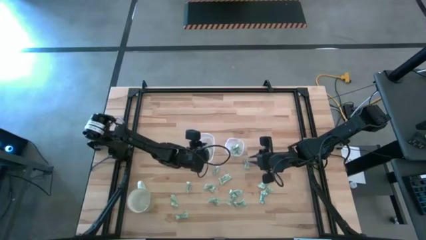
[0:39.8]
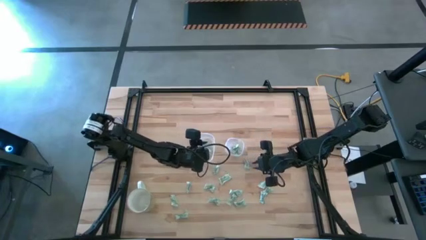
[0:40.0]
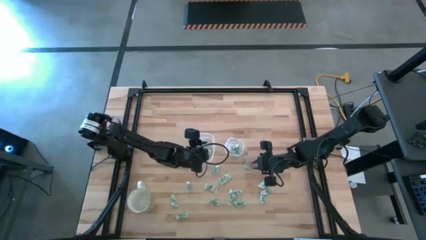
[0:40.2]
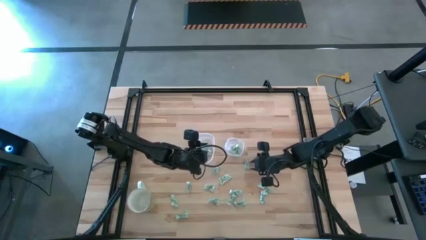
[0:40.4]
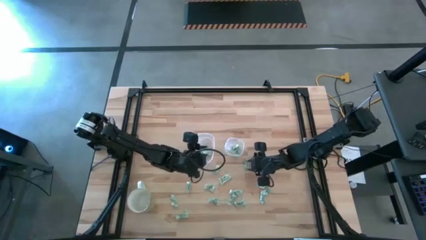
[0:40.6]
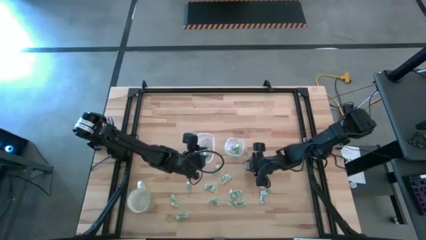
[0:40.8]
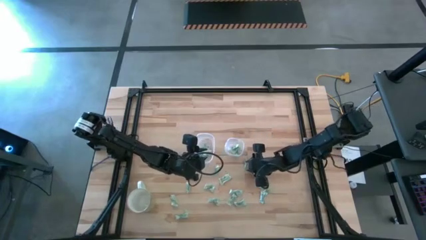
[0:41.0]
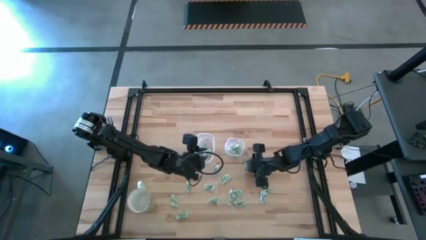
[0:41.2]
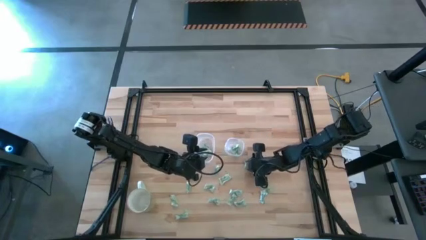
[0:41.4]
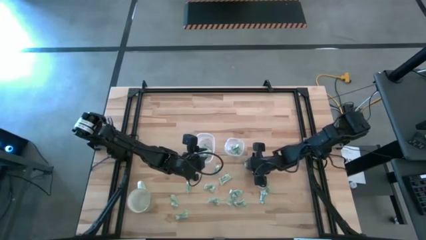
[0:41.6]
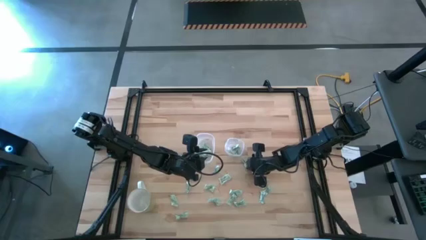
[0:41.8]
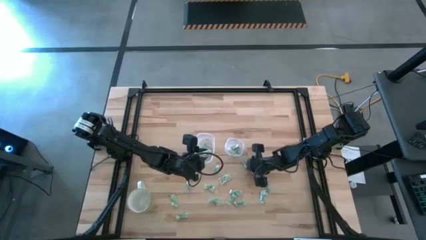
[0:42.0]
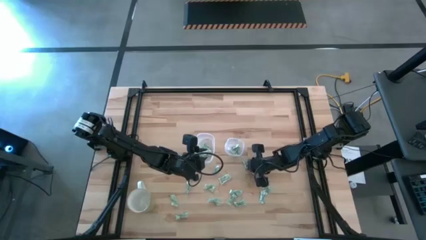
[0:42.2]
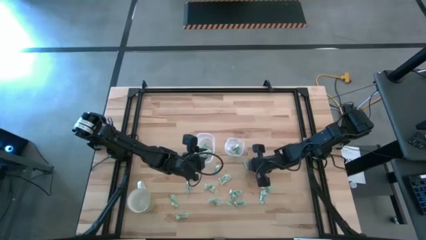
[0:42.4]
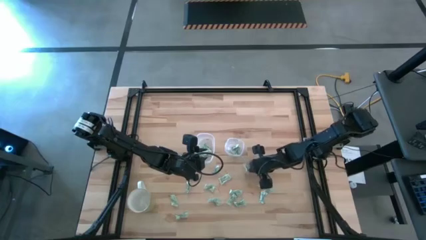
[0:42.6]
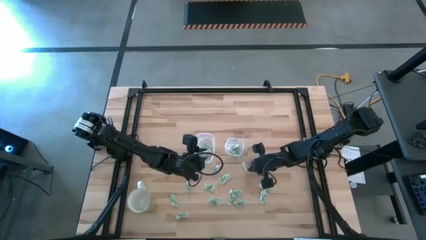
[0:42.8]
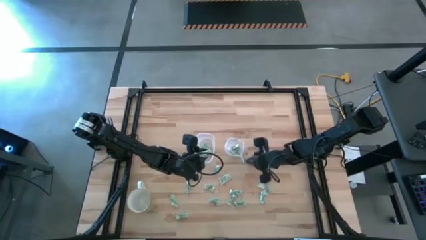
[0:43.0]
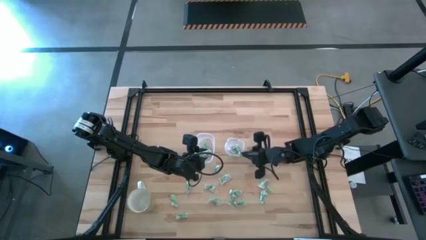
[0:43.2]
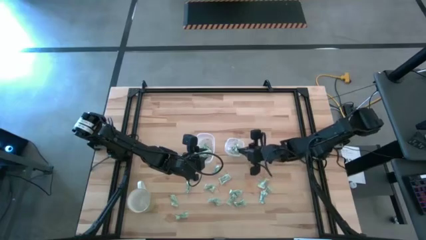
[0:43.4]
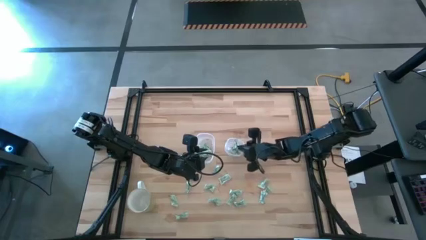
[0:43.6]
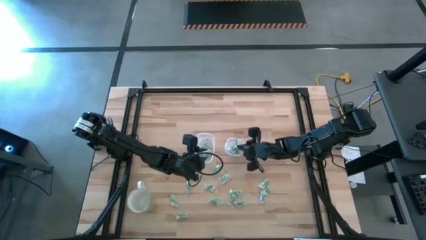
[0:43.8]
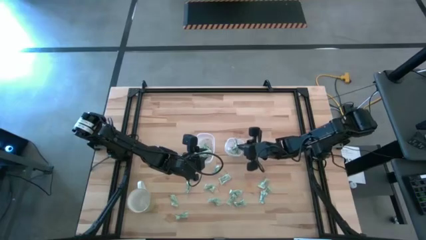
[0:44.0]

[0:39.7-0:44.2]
Task: Pick and place items into bin
Put the white stevia packet into the right transparent bin

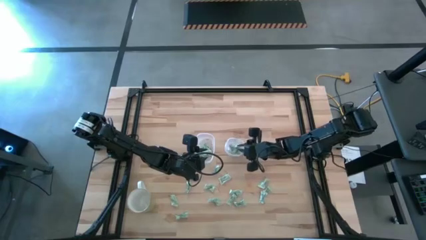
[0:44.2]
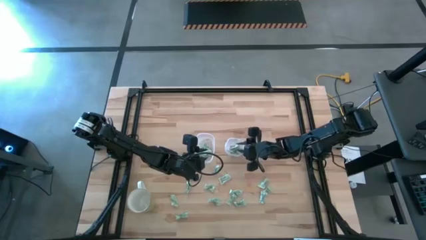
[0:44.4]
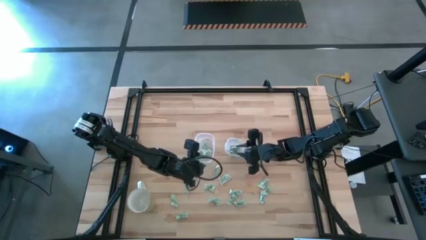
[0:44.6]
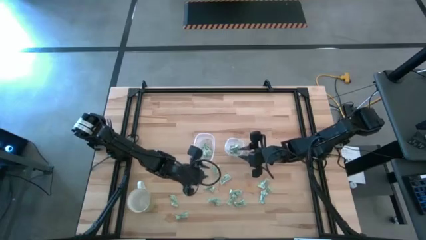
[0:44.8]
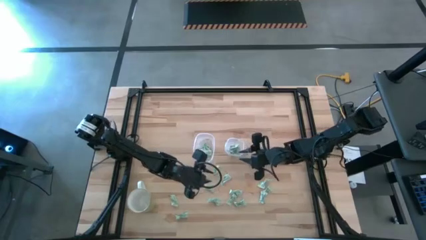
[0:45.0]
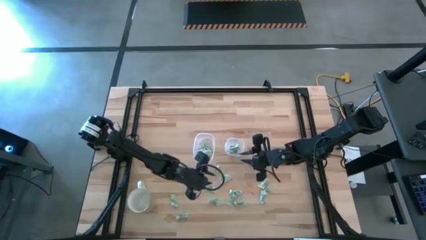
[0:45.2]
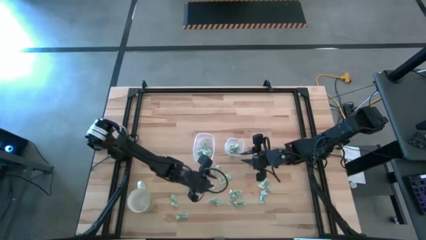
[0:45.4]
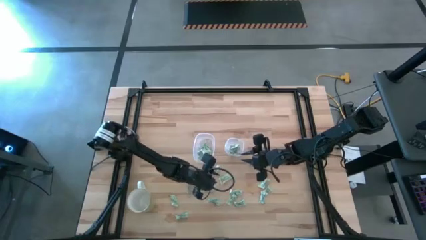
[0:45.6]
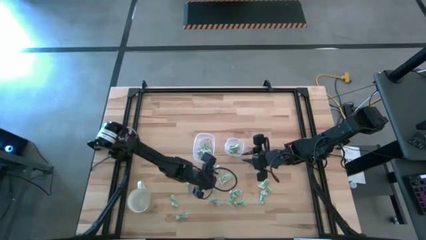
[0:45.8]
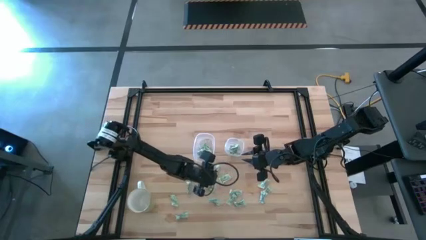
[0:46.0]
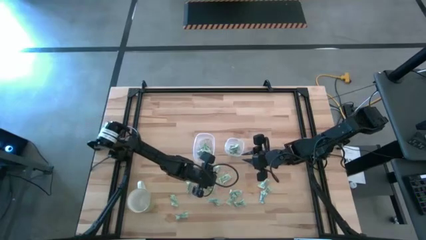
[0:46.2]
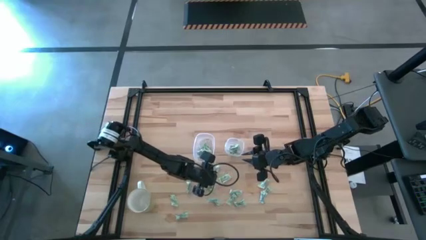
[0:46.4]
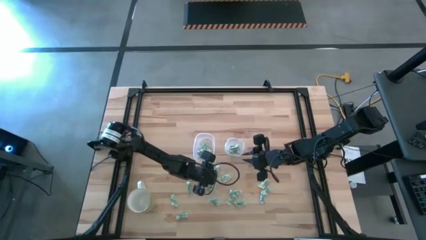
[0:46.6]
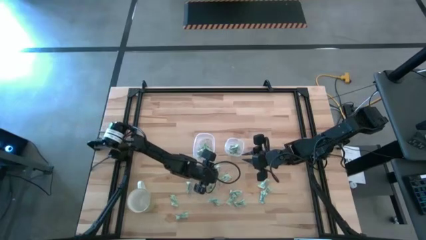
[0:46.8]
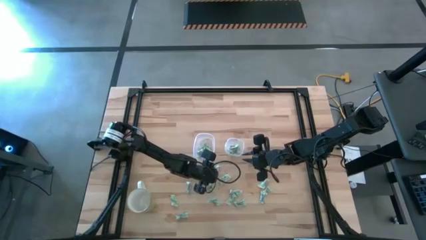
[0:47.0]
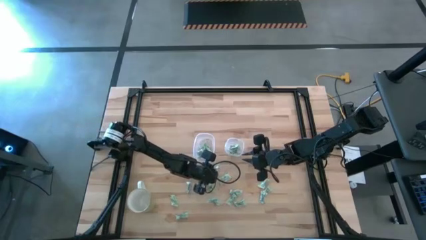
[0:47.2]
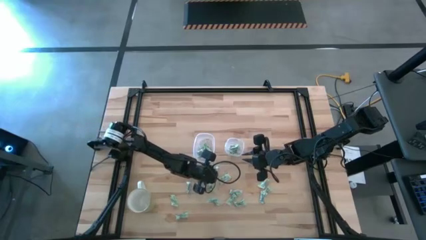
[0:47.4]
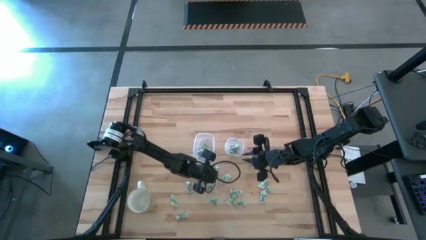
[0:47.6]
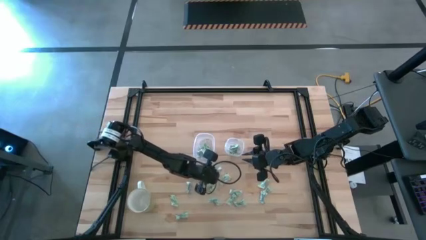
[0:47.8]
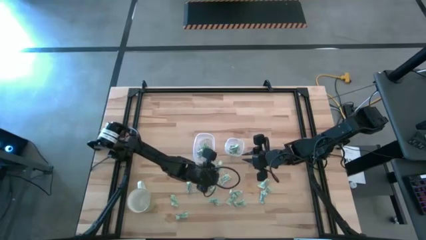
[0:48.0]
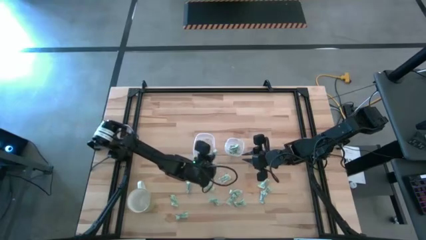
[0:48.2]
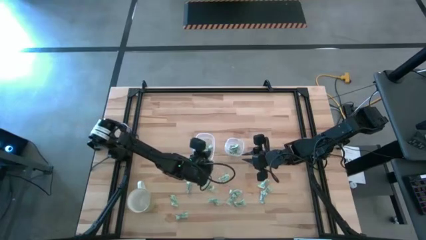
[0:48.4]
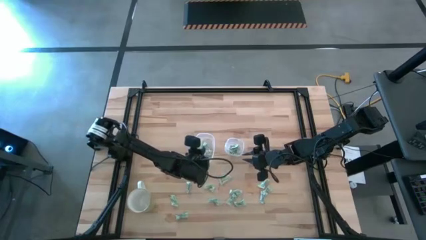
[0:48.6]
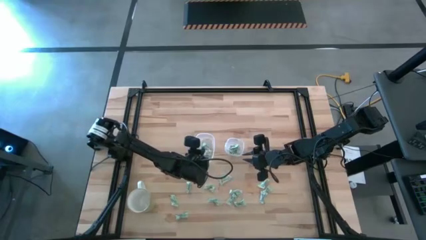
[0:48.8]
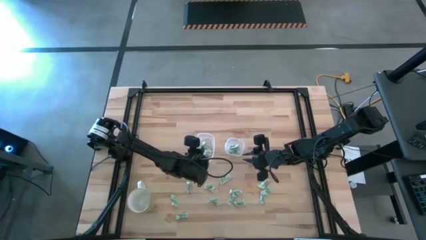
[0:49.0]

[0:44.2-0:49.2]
Put the white stevia packet into the left transparent bin

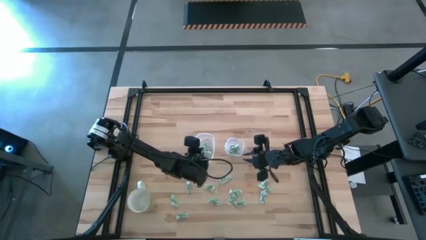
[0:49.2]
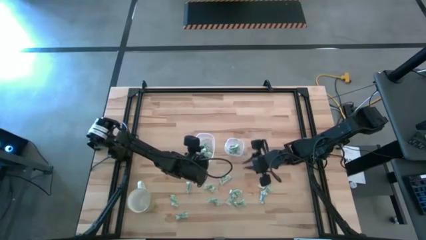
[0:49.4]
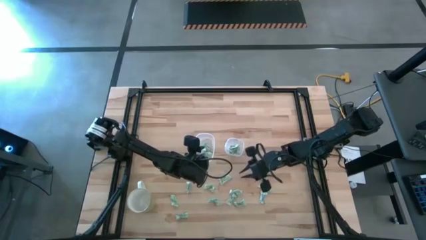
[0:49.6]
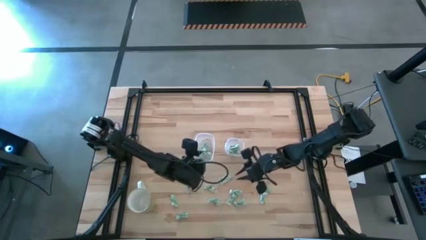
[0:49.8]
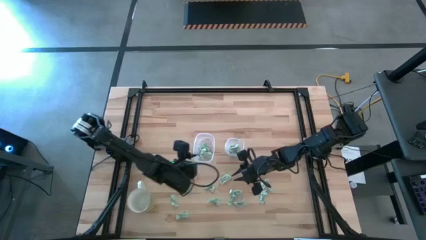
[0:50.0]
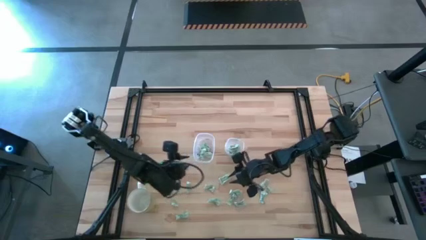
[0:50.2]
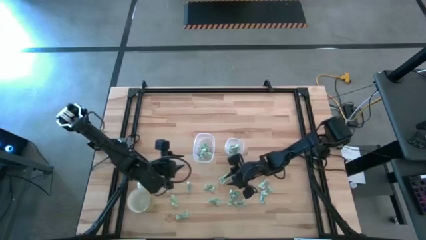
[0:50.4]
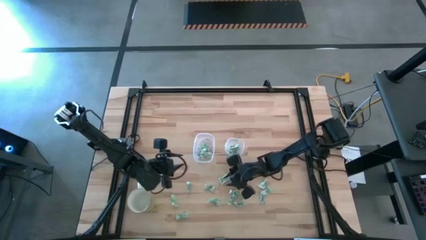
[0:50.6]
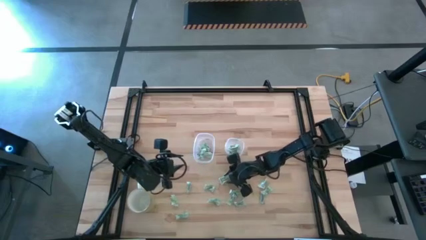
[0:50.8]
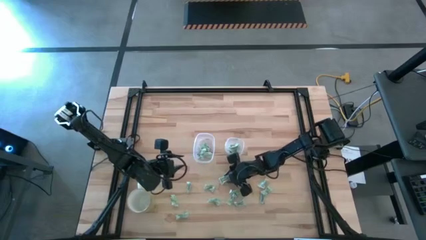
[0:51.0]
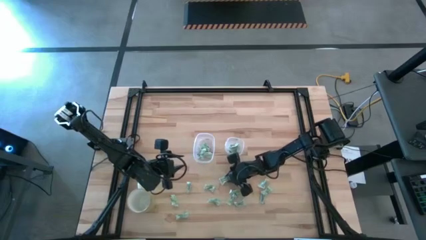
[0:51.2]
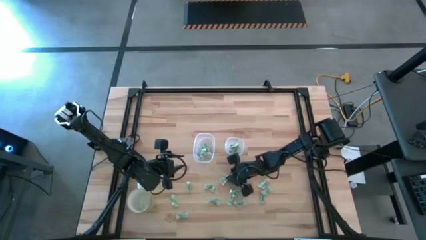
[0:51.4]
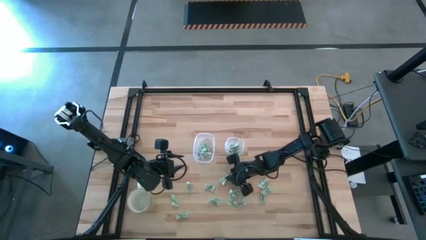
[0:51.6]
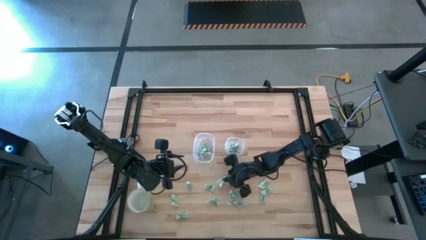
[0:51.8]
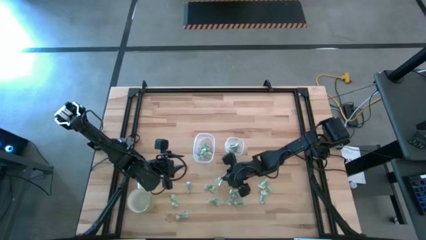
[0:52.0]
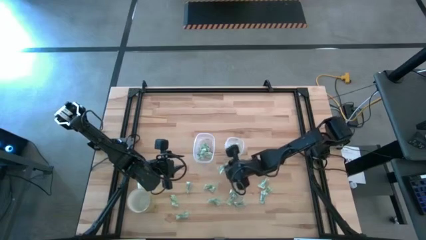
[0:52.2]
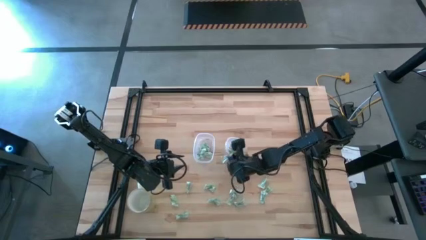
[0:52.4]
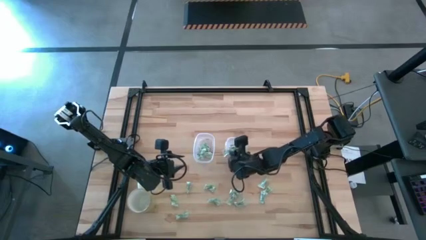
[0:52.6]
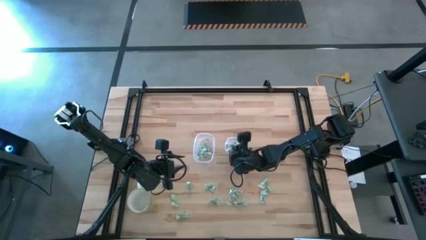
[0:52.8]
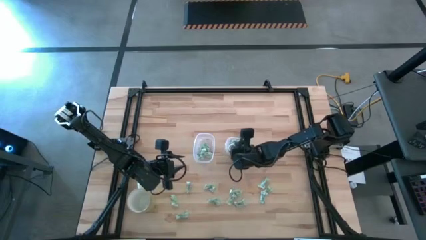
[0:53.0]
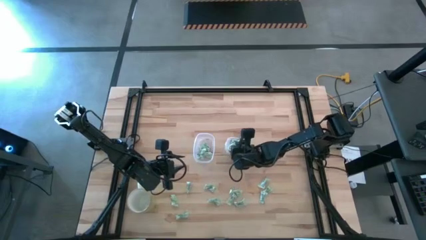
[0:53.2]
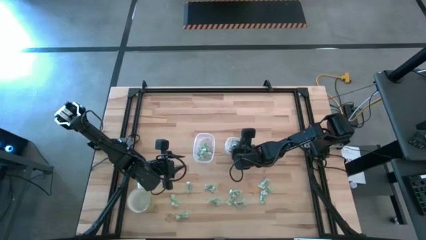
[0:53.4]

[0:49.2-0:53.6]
Put the white stevia packet into the right transparent bin

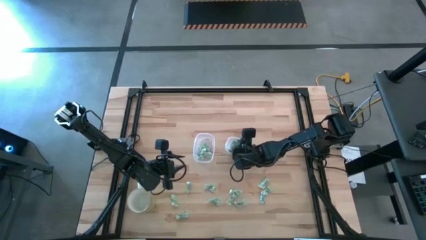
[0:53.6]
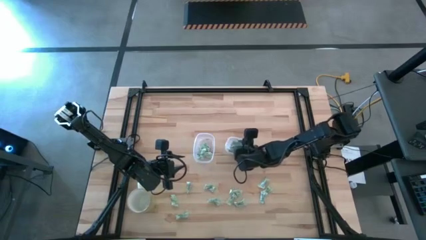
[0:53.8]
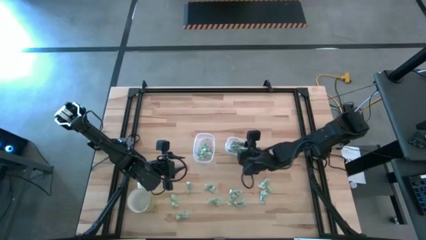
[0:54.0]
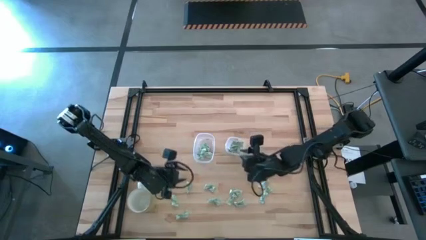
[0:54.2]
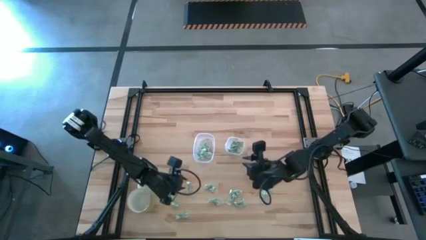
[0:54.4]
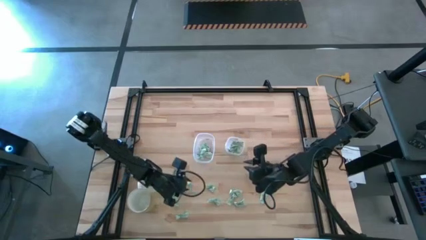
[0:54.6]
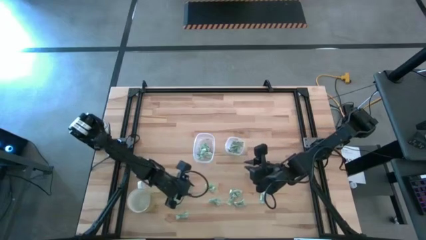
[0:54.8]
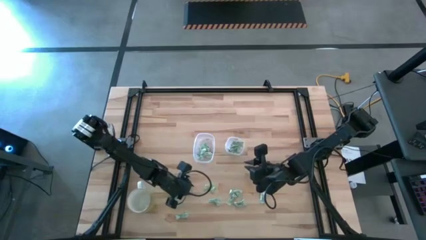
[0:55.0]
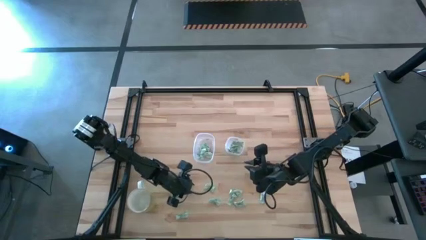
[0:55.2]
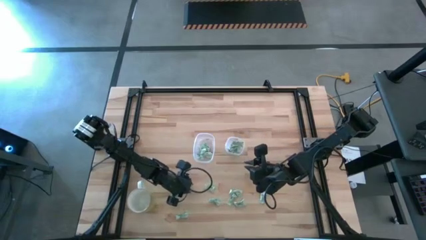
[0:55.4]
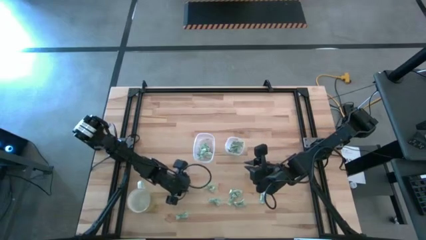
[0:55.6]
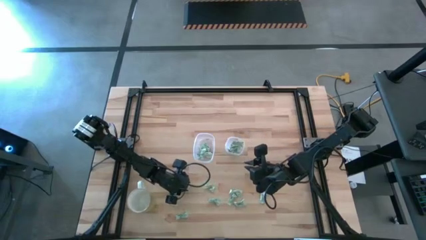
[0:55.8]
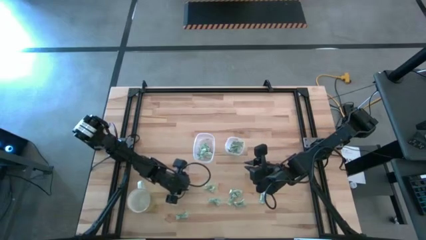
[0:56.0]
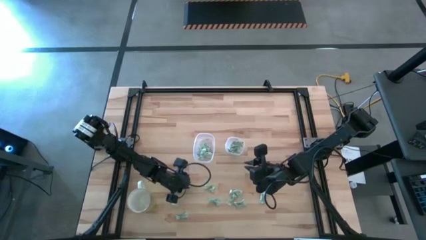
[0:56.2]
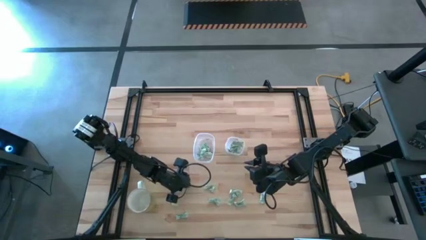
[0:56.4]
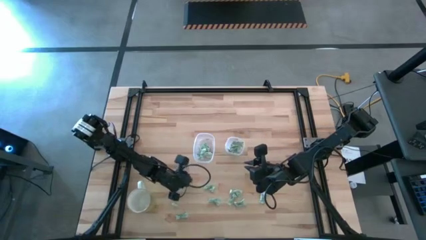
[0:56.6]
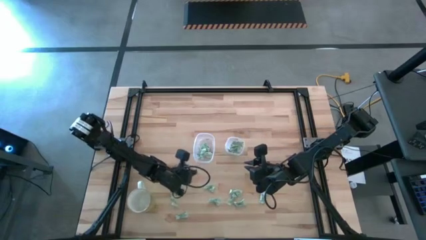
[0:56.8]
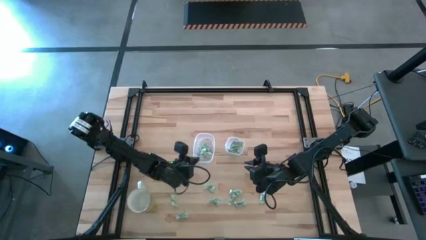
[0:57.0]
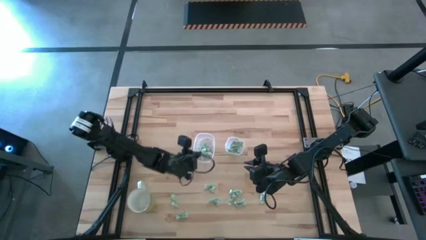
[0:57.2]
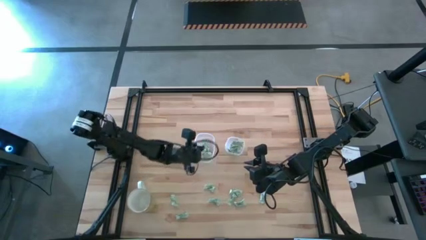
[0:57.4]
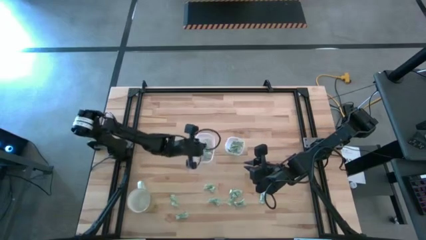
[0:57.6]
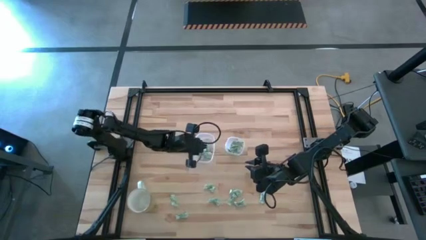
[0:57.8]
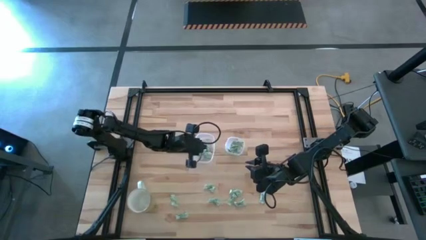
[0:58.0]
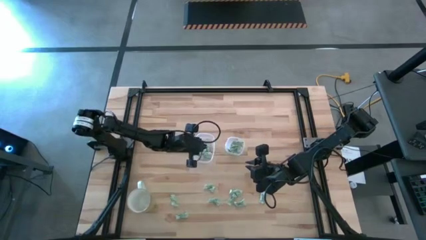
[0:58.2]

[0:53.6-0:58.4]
Put the white stevia packet into the left transparent bin
